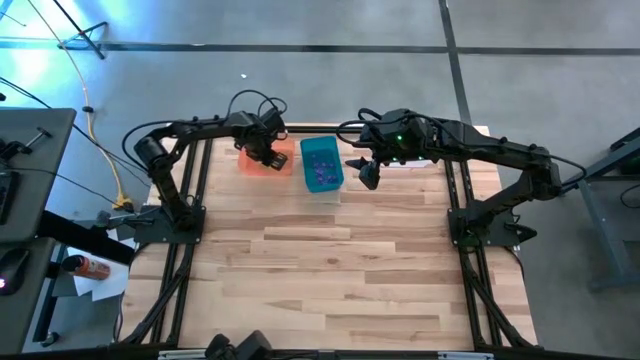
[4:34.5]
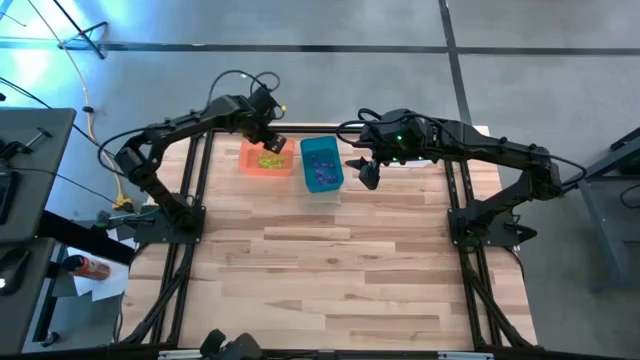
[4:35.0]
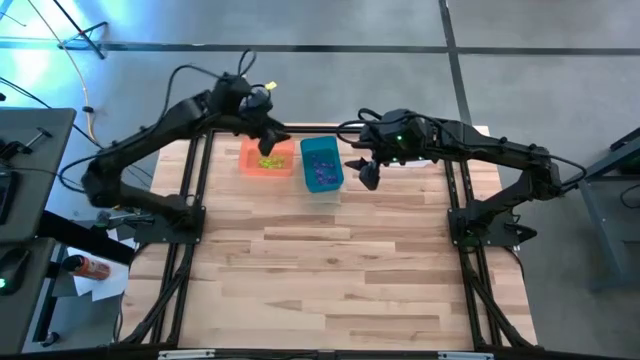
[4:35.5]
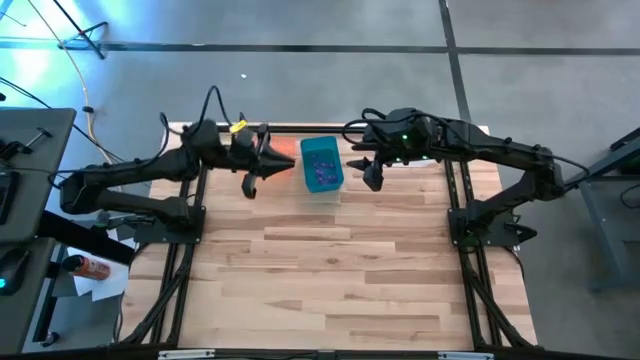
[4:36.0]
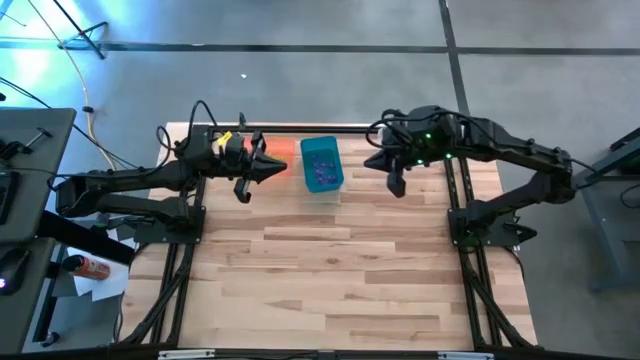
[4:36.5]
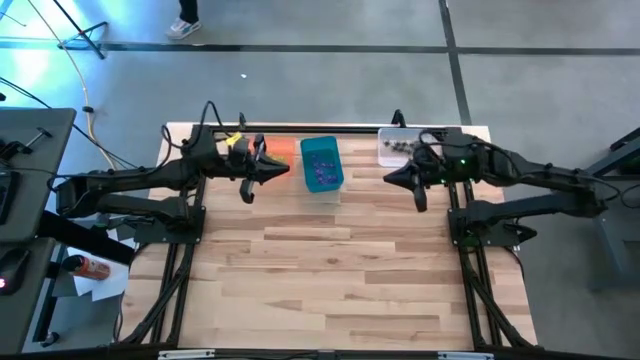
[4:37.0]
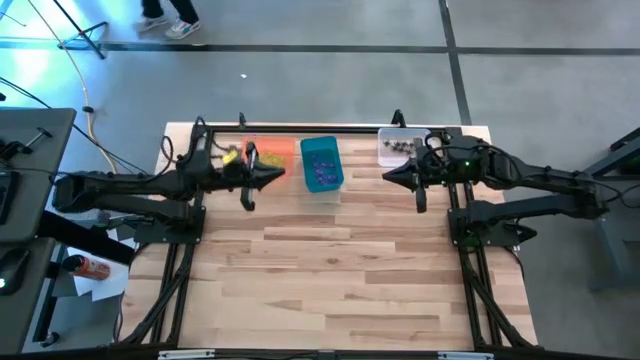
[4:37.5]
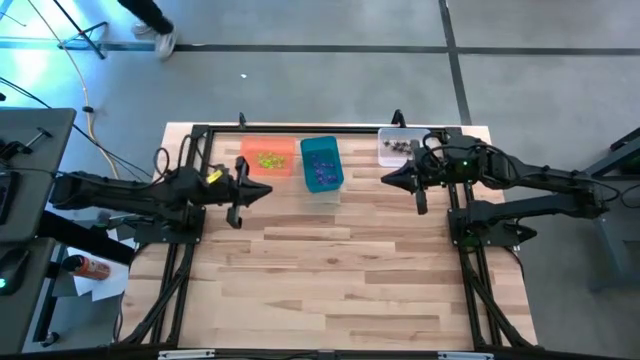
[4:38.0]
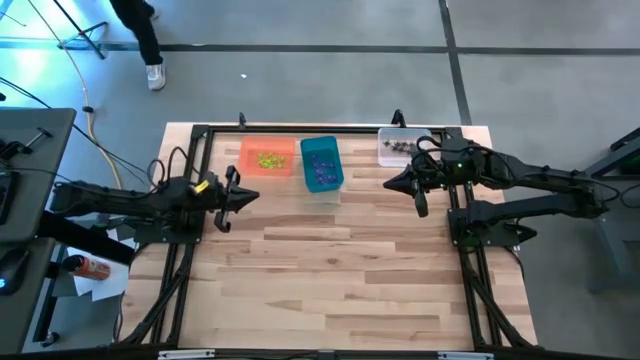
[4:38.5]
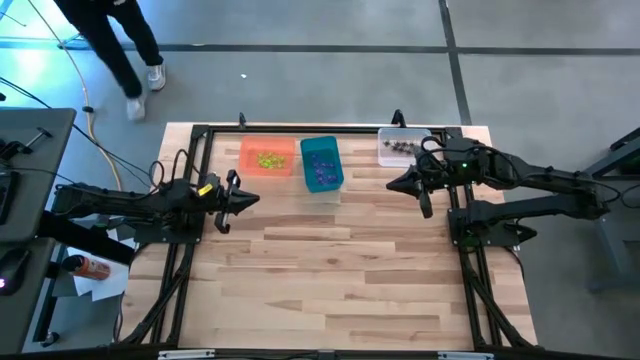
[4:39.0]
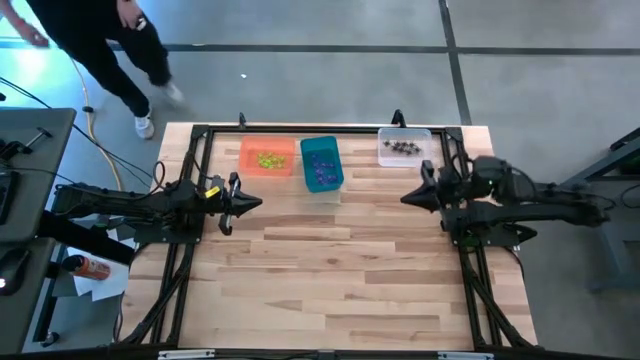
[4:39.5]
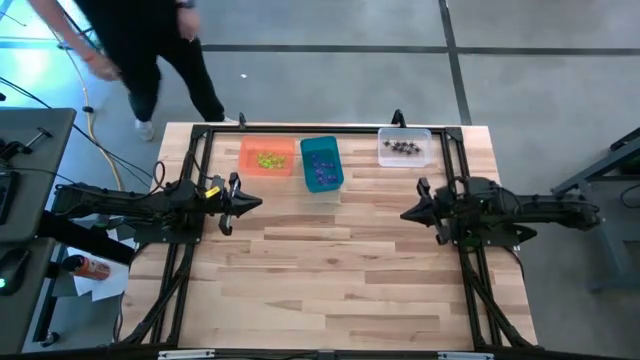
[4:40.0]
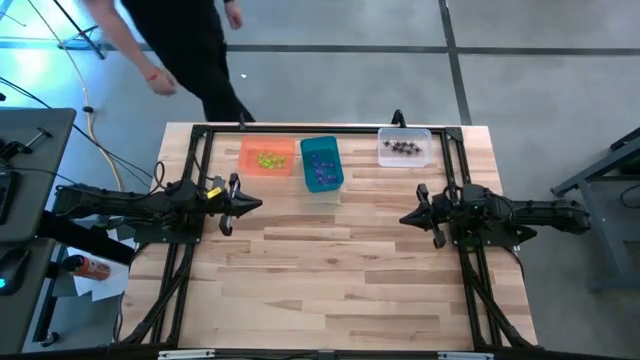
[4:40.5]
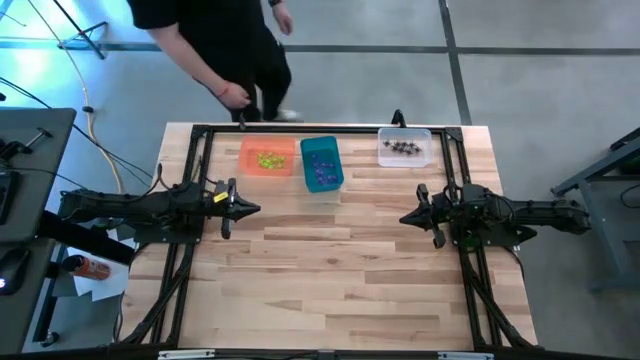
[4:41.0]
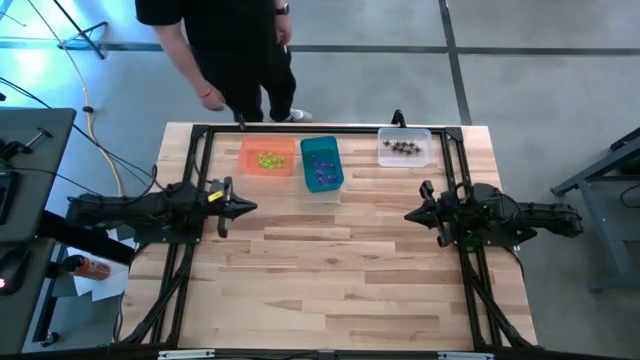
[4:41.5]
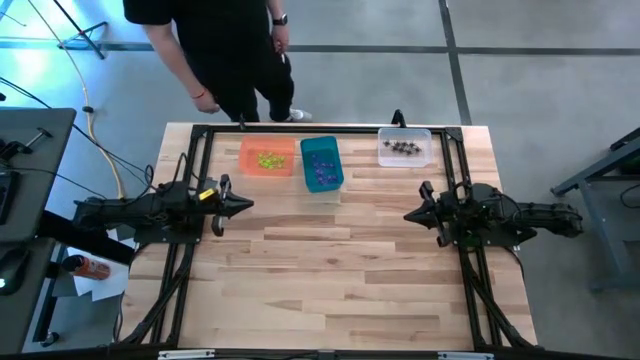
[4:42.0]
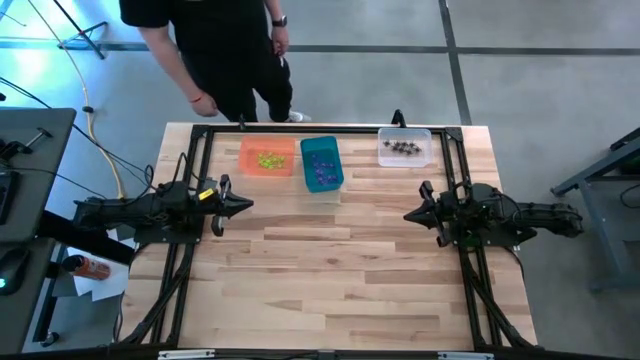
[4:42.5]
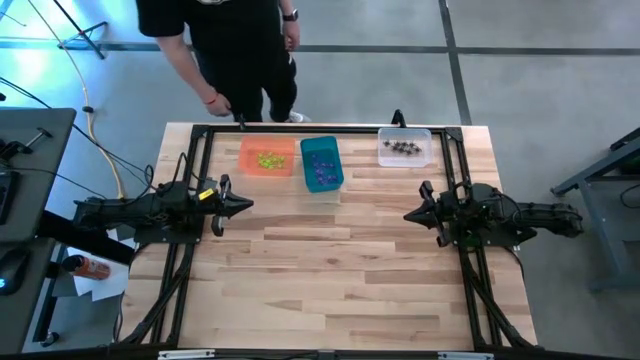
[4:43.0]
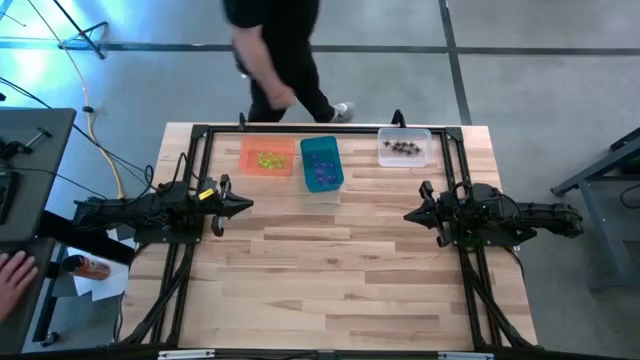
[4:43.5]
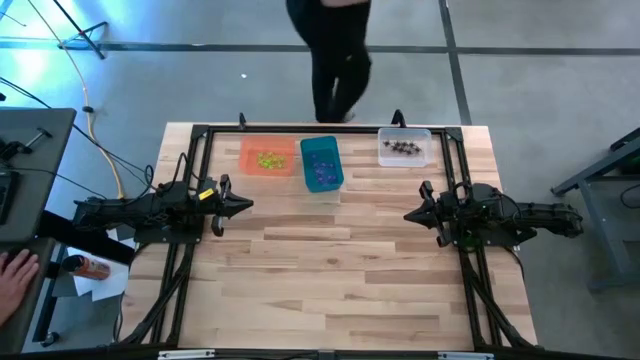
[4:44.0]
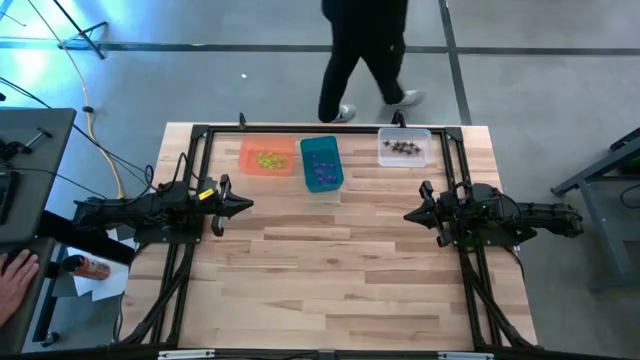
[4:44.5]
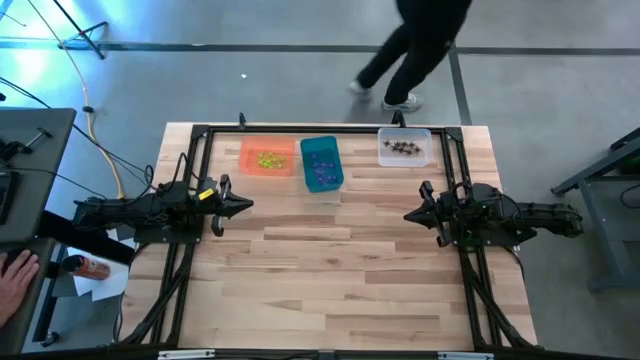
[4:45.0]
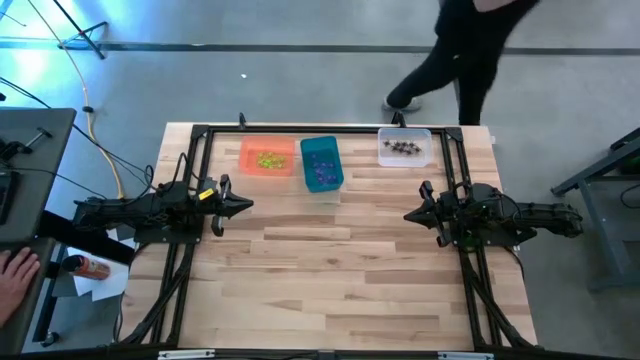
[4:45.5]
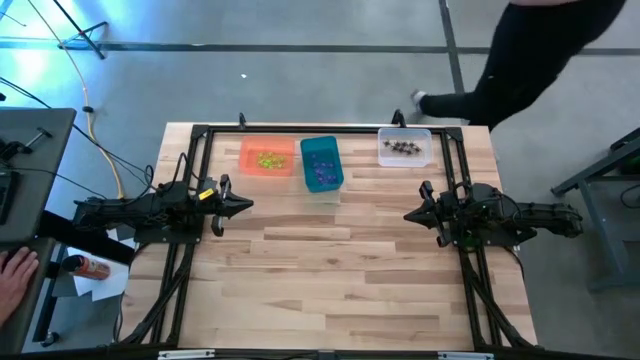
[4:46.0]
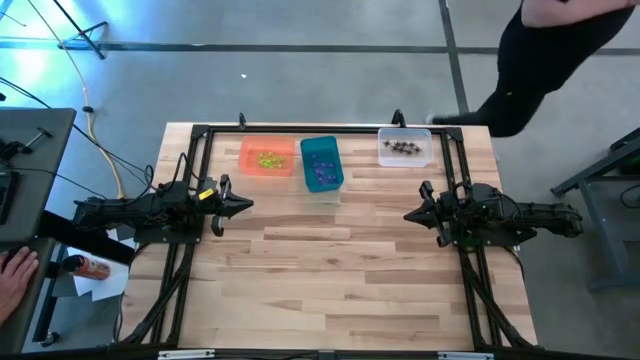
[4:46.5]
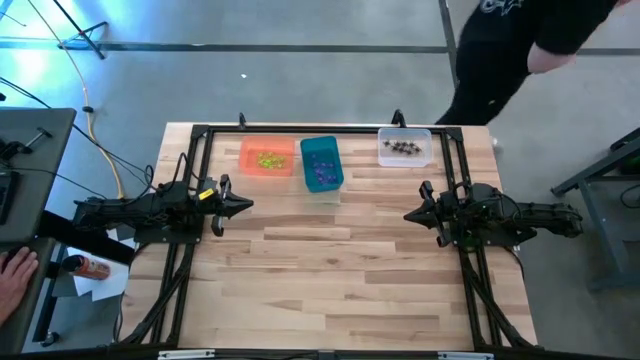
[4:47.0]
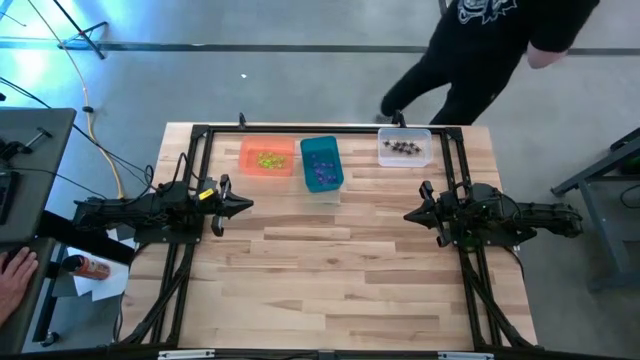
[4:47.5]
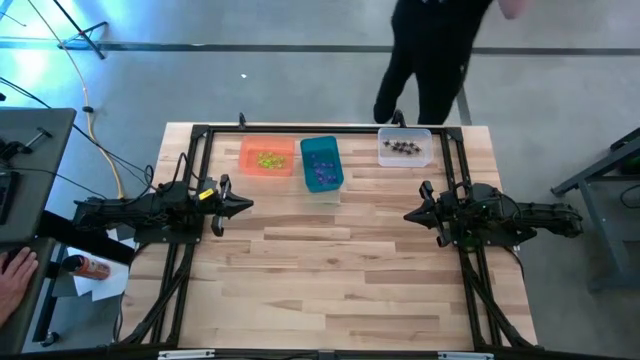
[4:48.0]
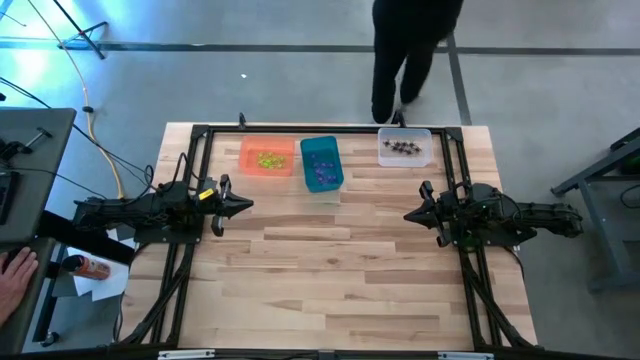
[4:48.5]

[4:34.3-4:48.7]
Task: Sort Halloween decoration
Return to Home Position
